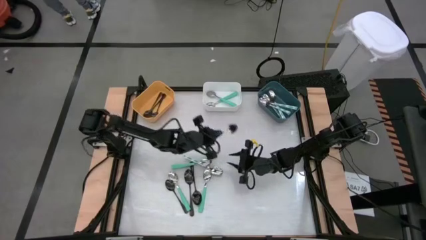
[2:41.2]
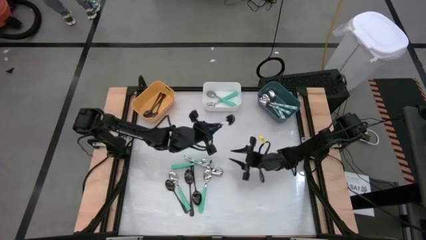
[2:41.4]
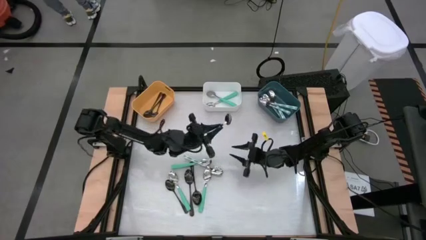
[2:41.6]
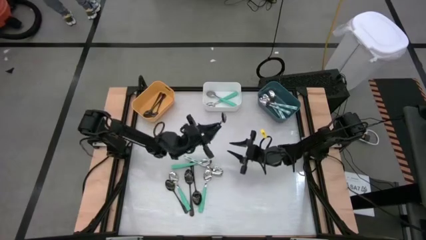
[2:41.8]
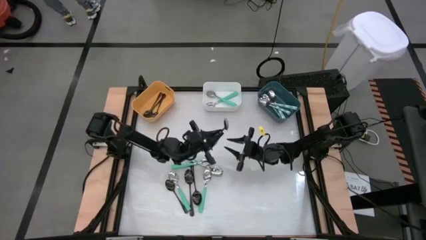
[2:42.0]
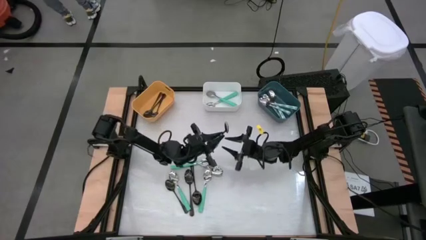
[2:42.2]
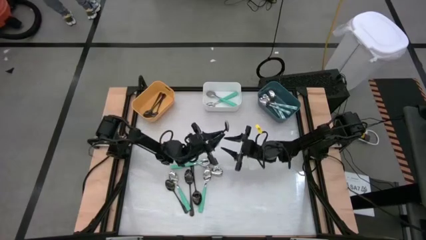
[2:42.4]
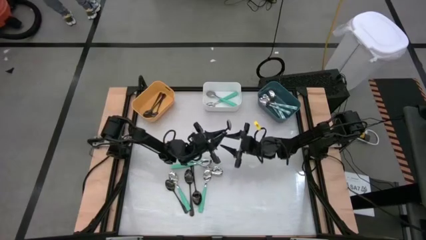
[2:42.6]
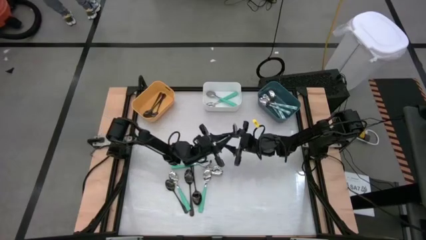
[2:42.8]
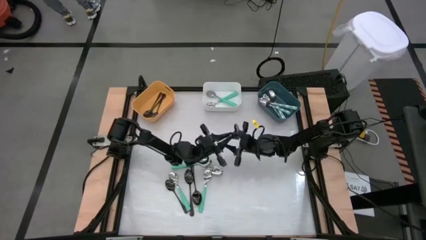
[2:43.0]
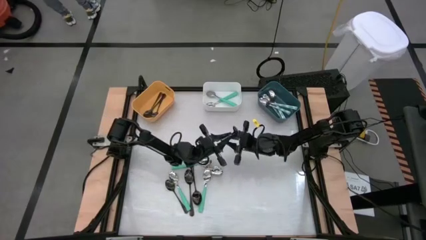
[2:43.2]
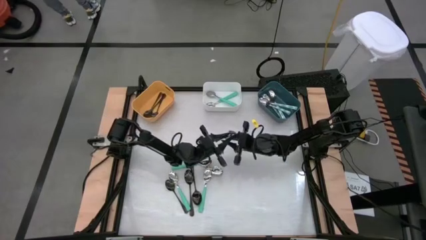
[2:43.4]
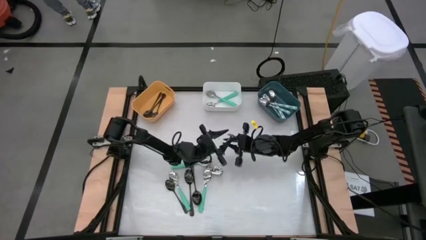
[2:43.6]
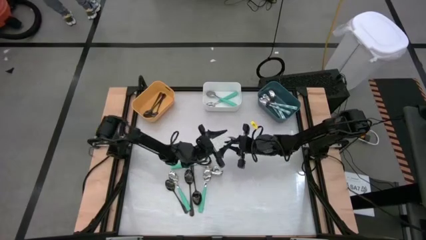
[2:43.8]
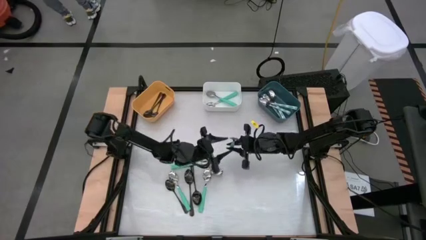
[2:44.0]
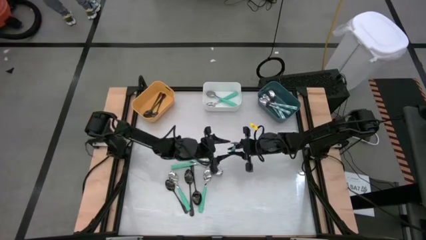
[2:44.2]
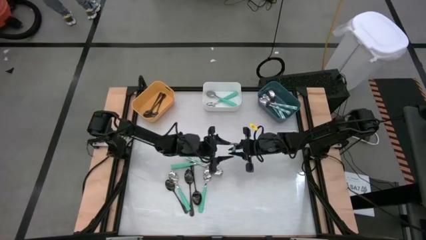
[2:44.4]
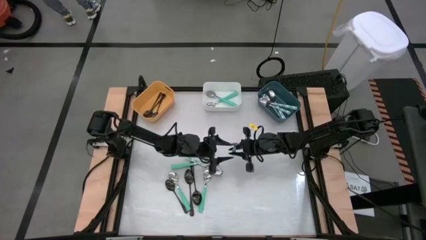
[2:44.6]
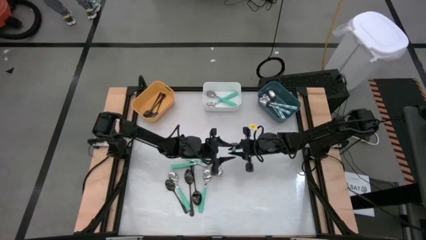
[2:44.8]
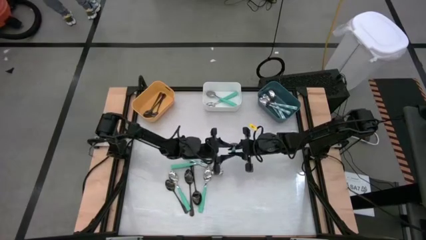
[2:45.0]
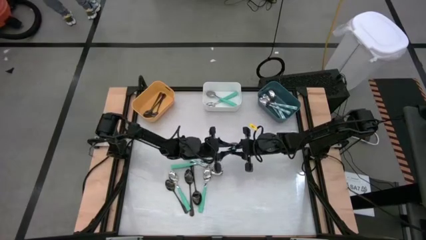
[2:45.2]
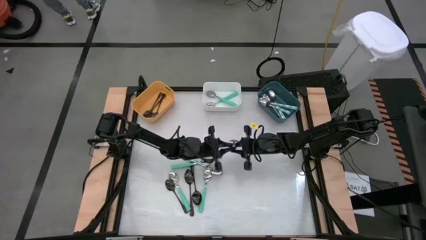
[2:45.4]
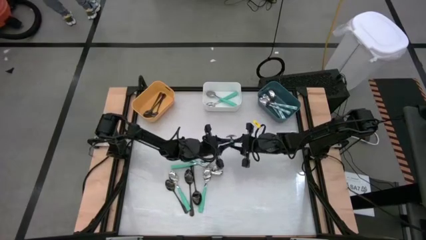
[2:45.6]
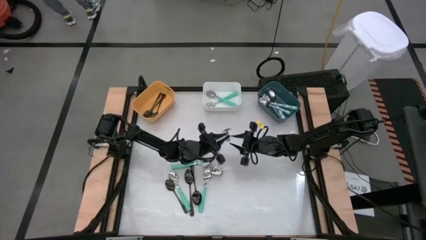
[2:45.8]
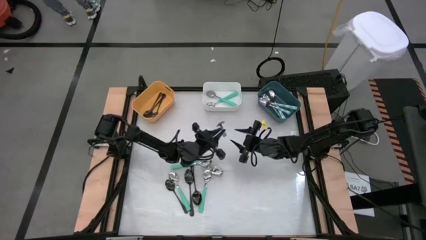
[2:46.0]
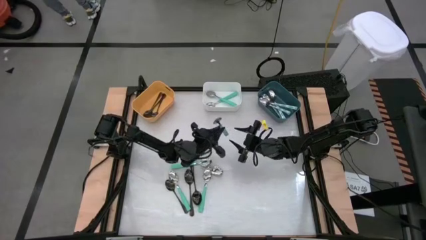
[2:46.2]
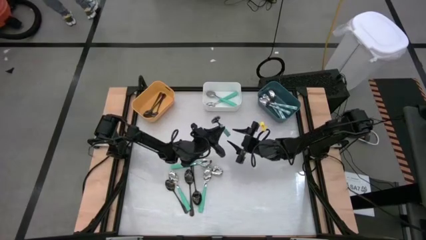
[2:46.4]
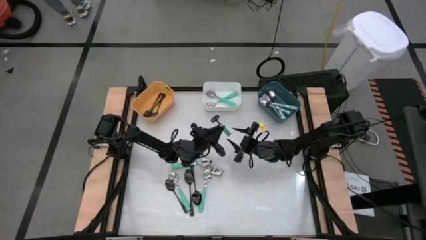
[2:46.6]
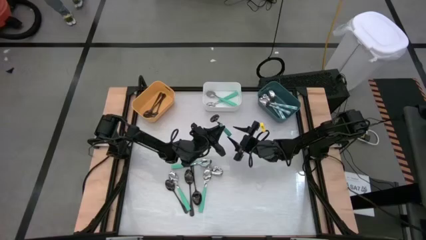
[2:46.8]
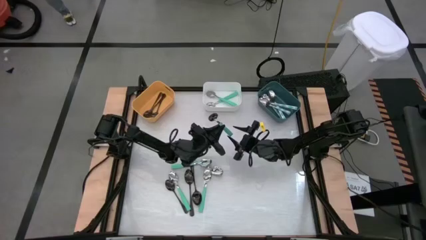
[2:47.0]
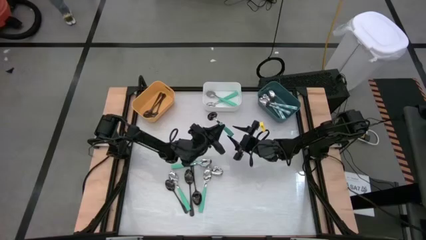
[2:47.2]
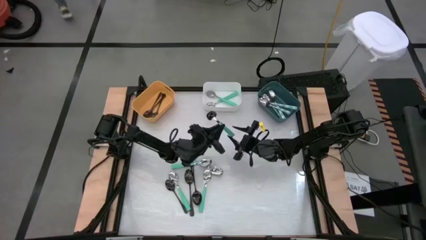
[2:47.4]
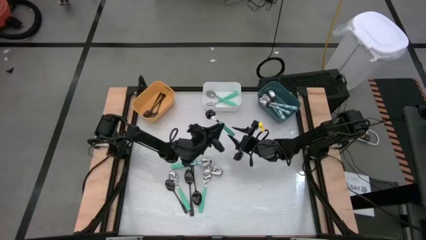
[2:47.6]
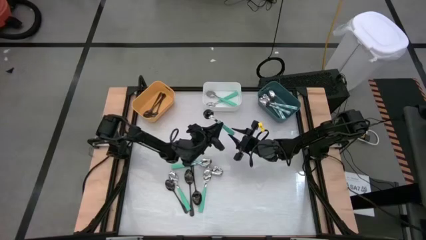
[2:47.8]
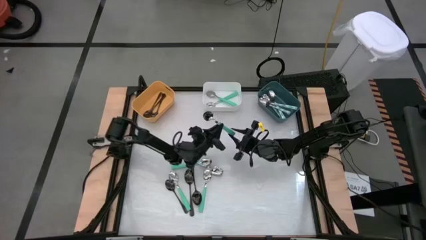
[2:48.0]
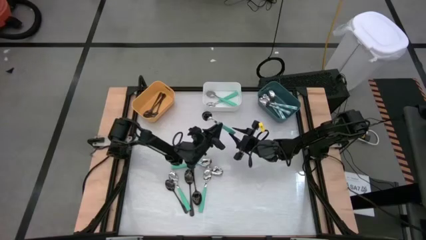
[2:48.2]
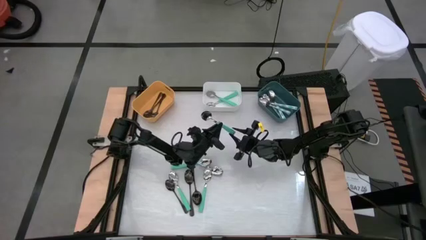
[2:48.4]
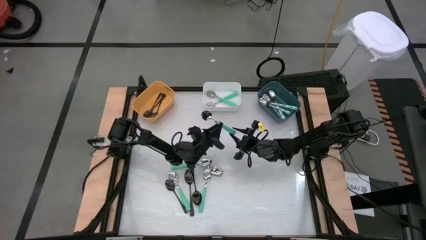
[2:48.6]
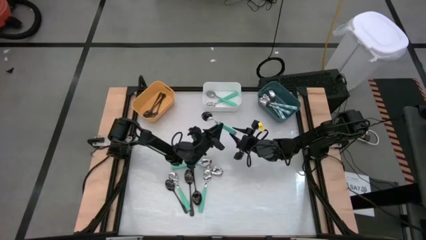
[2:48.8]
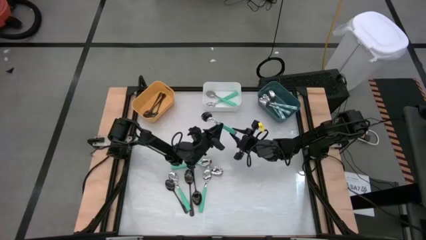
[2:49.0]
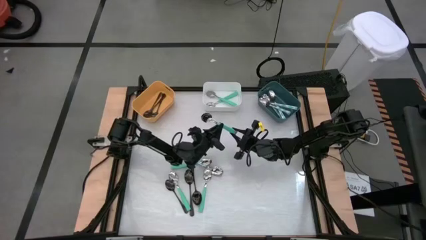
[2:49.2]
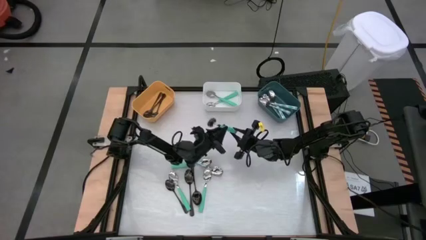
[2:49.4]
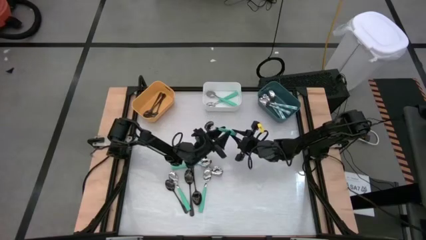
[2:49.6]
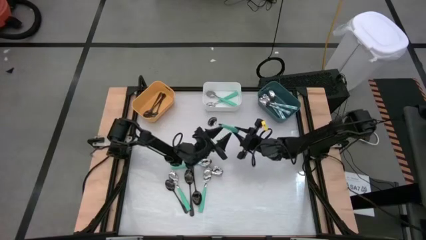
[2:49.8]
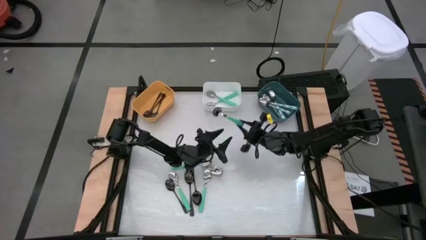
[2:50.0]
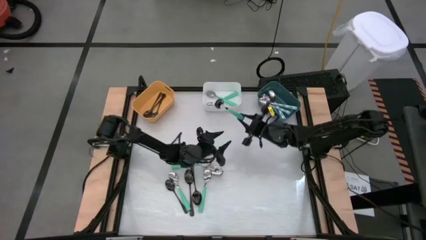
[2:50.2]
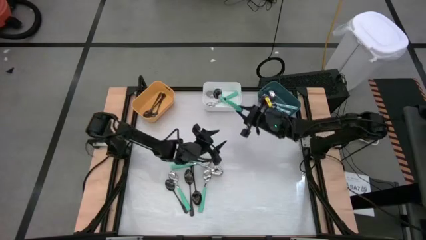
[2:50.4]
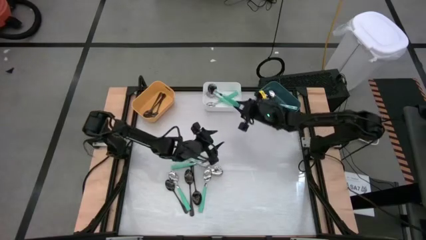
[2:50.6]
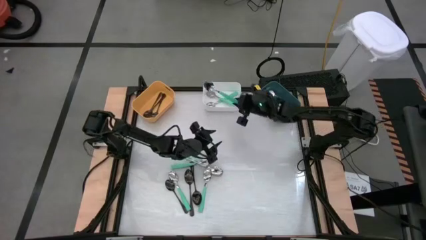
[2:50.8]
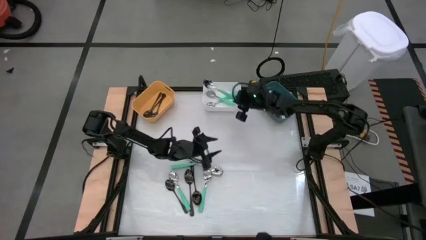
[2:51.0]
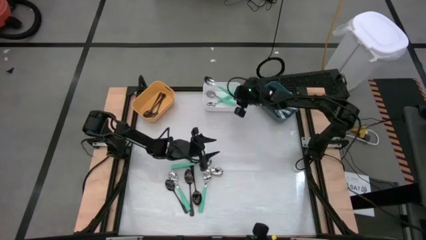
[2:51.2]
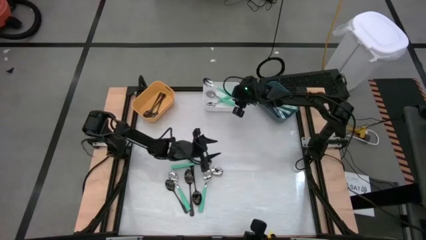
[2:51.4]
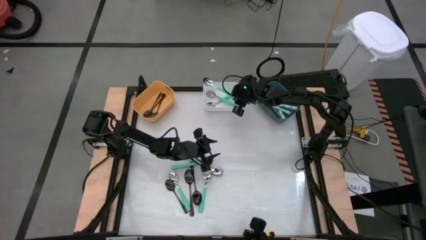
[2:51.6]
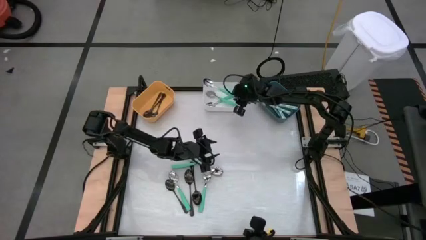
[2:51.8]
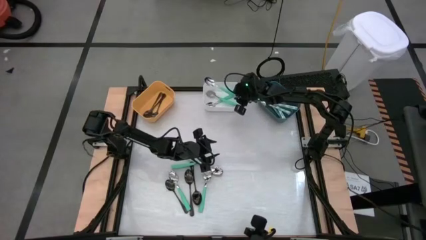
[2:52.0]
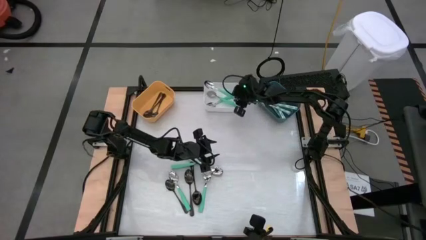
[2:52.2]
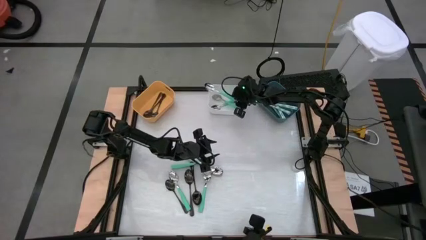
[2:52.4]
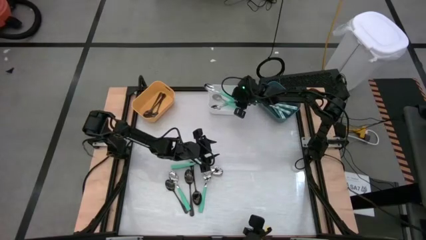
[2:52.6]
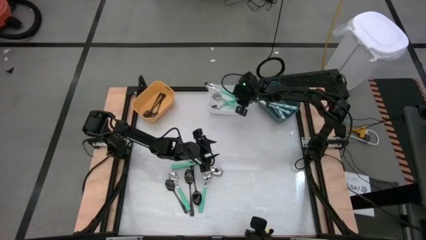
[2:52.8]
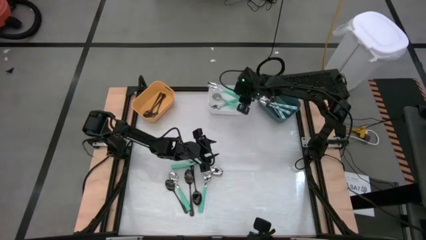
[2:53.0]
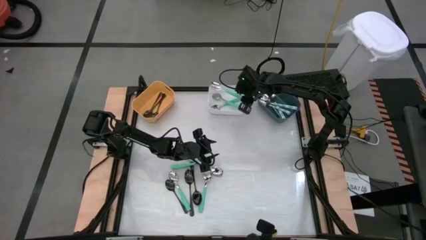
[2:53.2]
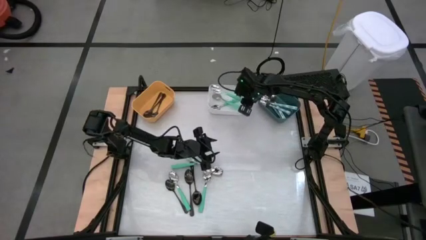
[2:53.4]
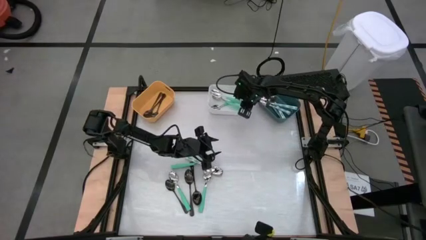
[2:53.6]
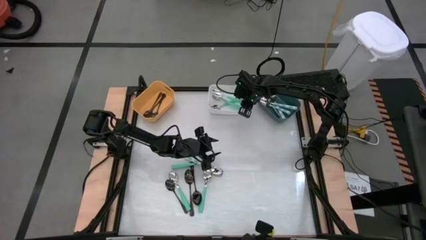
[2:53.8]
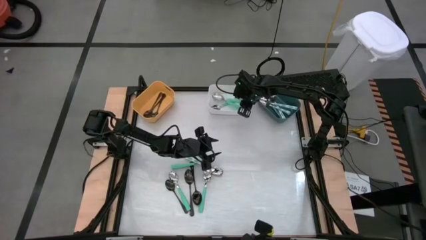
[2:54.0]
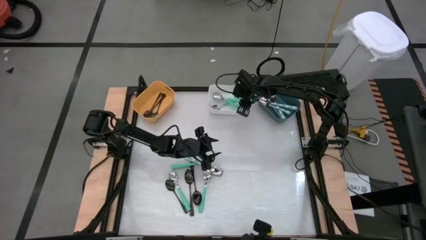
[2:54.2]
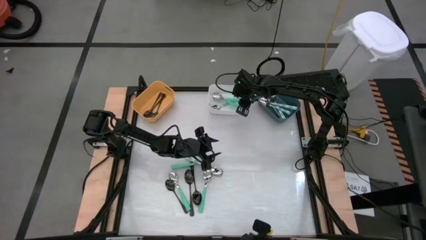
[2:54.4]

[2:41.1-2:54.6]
Task: Sort silverware by color (type)
Put the blue patterned spoon into the blue bin

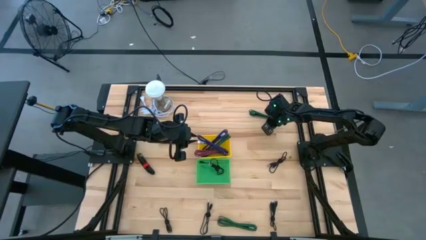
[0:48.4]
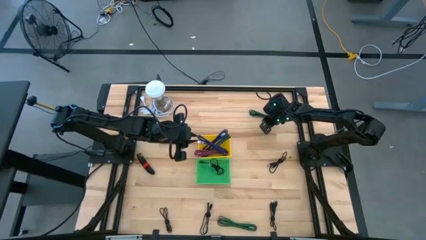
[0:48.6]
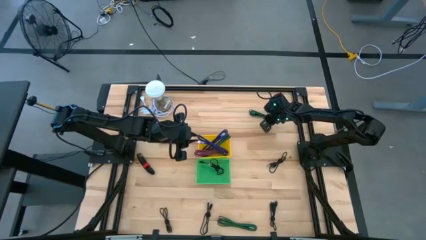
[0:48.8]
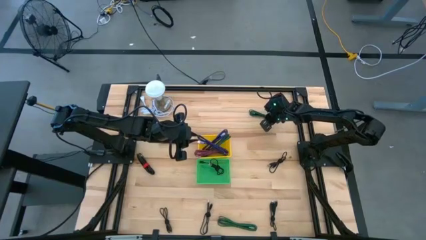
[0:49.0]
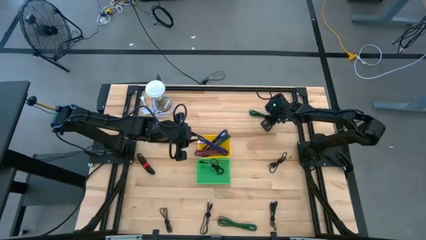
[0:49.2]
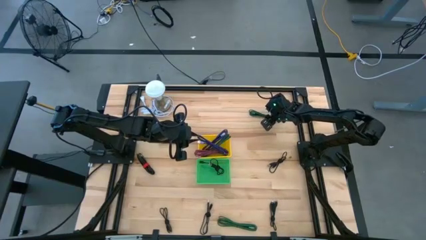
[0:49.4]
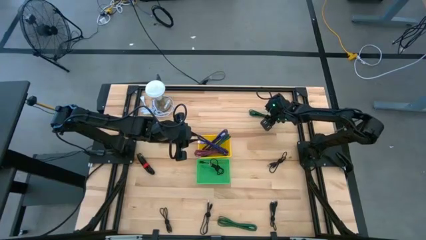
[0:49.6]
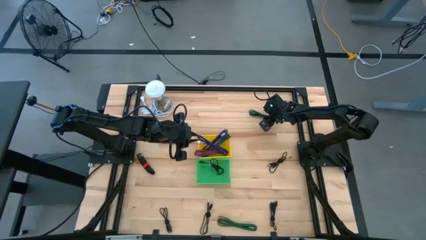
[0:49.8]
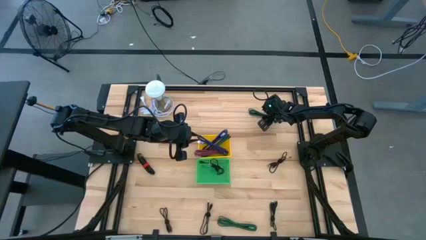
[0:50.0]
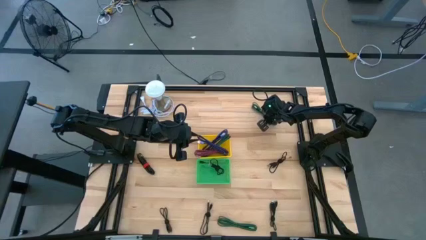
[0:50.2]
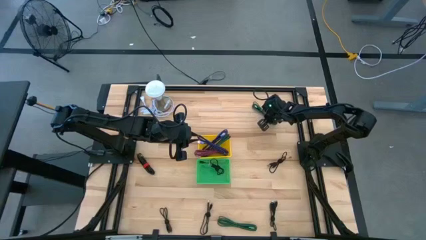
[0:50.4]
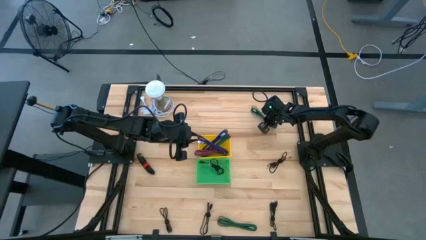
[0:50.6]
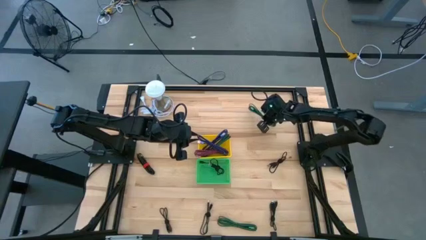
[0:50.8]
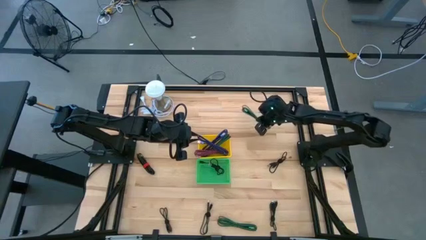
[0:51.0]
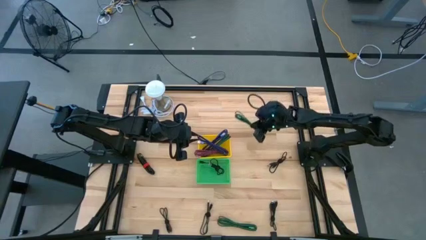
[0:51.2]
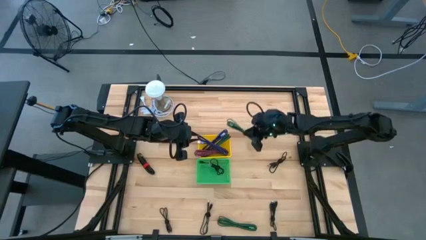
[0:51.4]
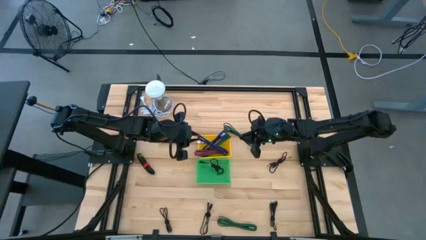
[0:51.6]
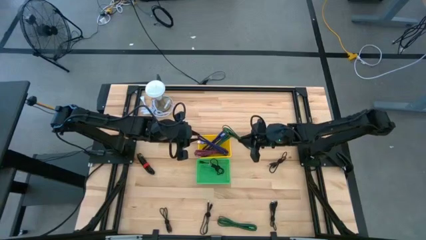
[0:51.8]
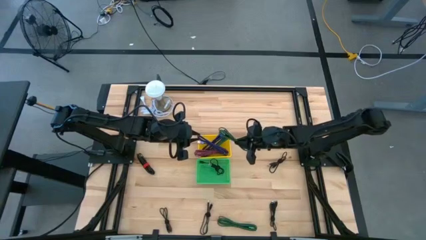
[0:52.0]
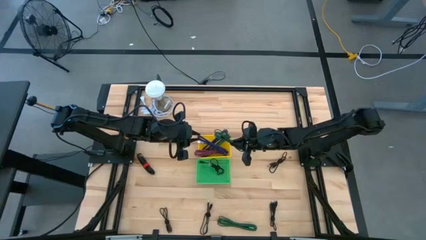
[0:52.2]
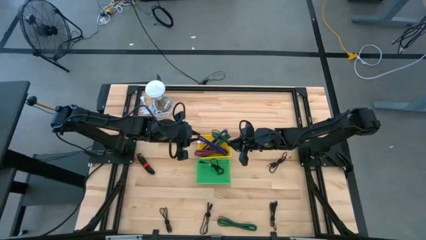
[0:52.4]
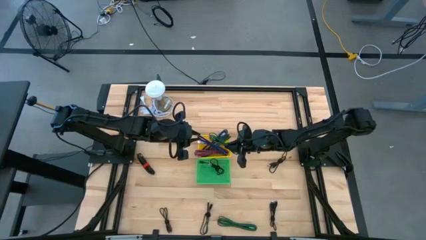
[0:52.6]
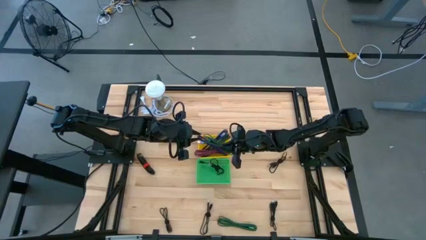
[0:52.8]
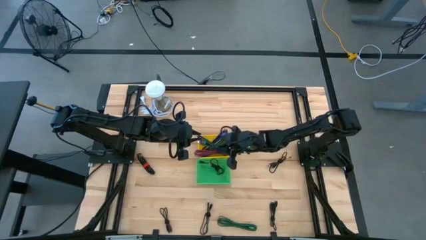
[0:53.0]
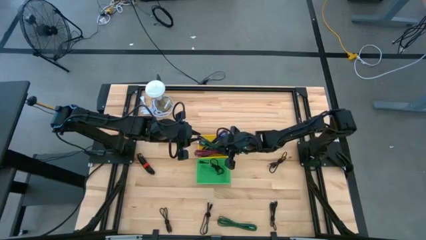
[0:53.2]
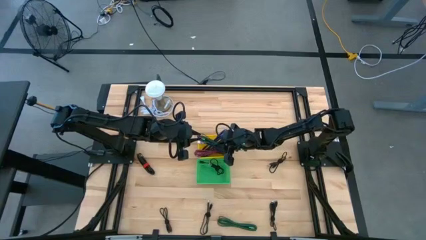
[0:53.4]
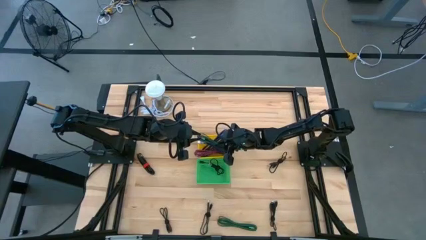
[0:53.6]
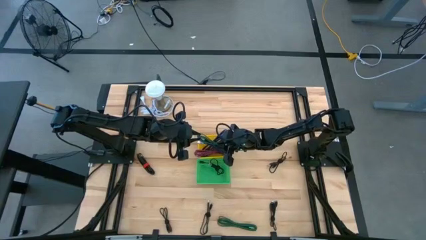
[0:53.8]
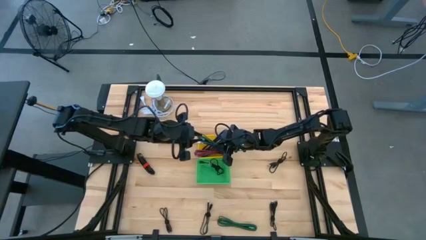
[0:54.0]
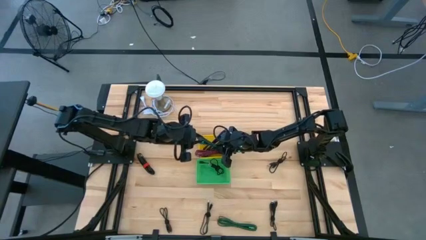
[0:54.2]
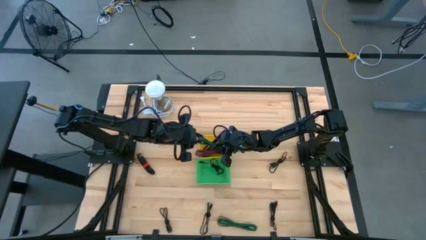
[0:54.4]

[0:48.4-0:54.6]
Task: Pick & Place USB Port
Put the green and black USB cable into the yellow bin
